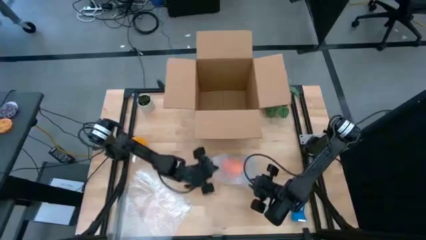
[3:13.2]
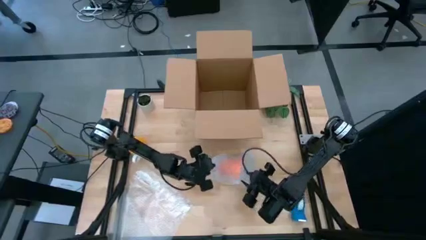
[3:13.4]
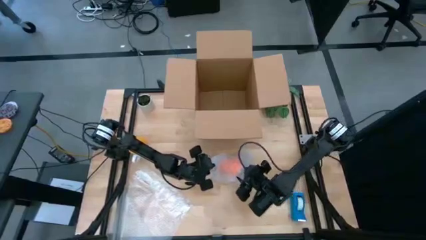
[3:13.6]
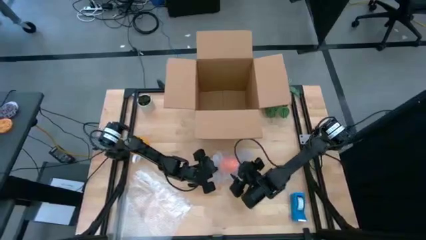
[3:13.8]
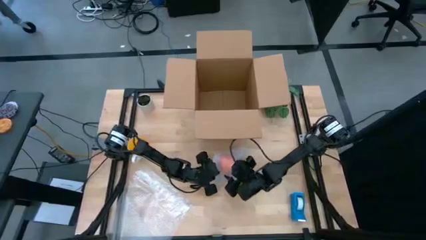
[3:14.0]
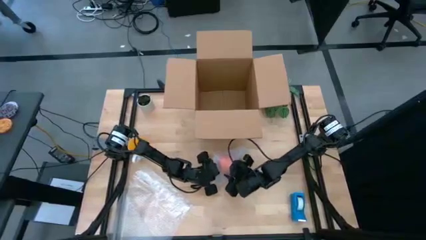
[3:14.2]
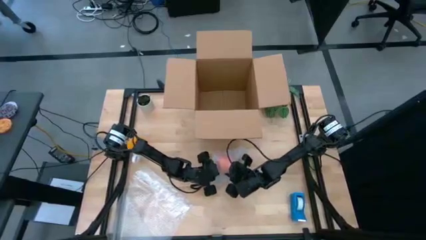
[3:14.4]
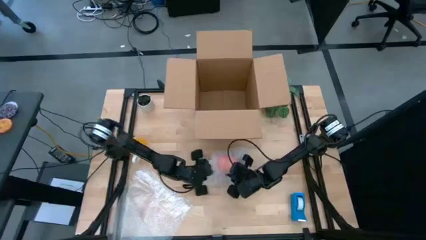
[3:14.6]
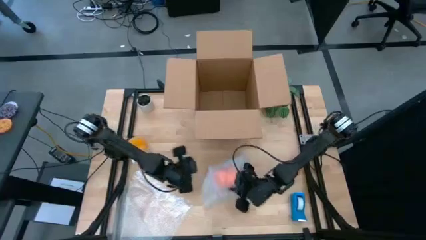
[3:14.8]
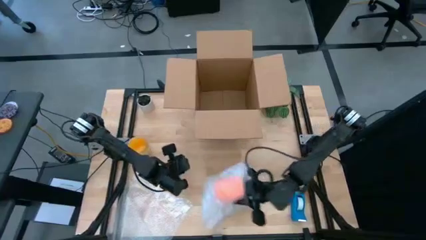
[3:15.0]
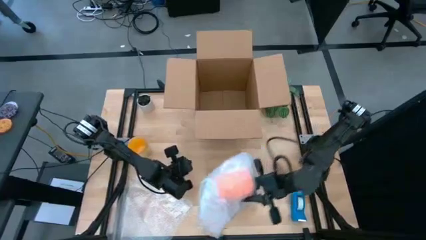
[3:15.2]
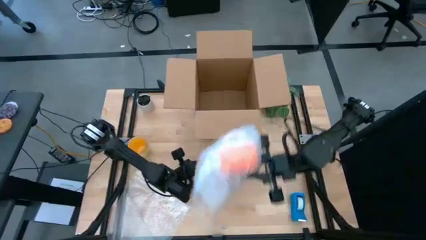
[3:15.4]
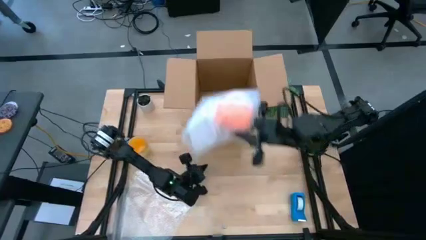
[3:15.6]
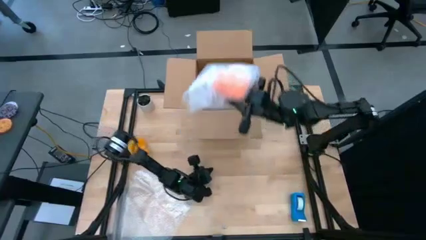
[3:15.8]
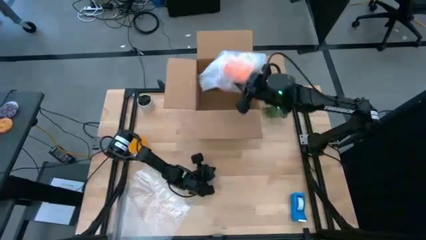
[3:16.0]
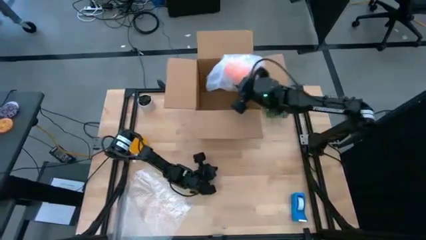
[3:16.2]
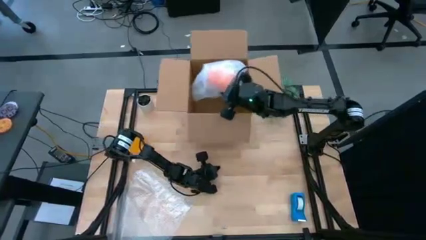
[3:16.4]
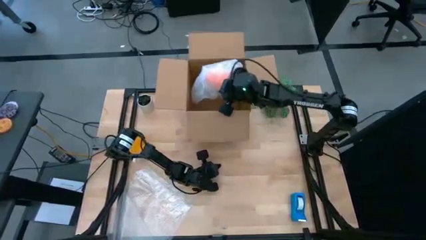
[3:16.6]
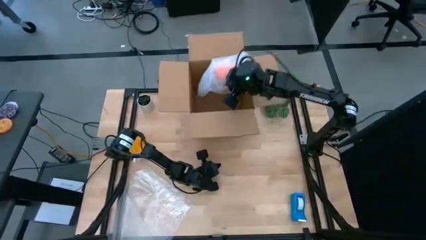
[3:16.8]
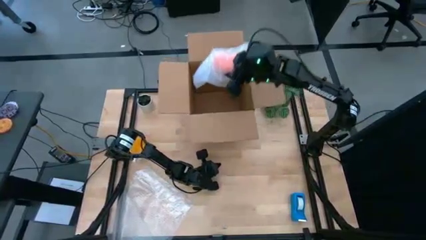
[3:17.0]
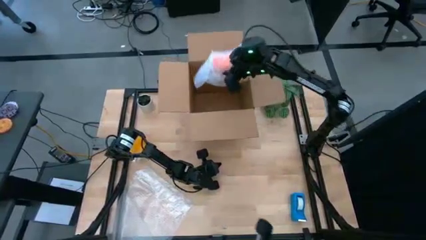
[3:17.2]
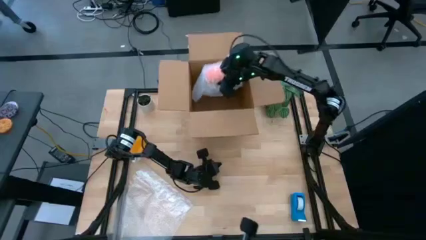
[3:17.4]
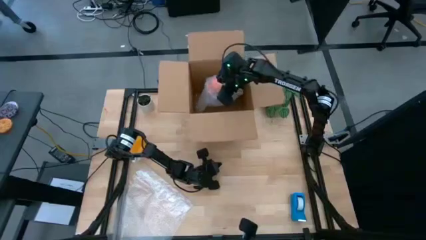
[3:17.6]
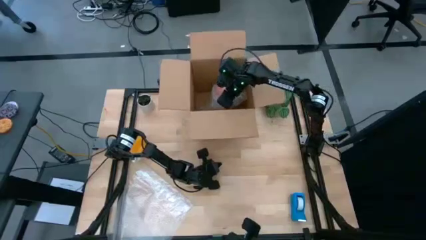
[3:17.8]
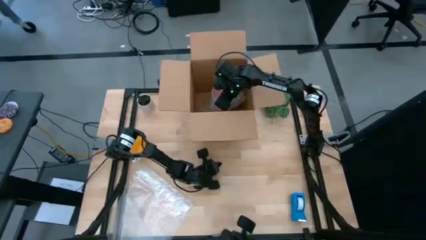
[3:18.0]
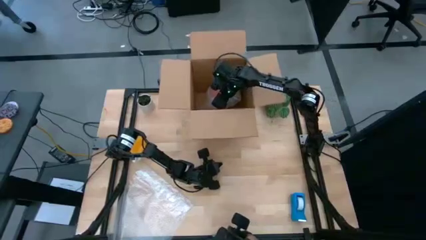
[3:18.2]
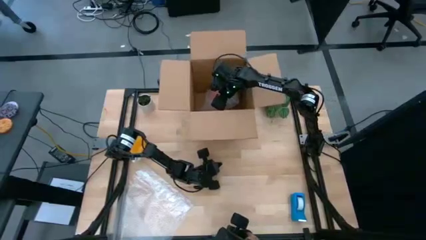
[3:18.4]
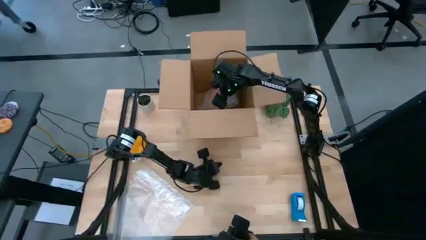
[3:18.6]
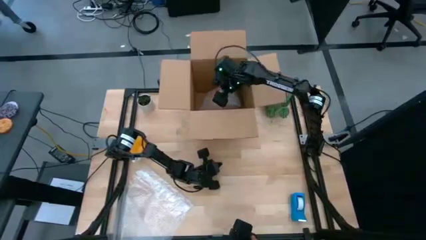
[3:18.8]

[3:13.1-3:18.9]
Task: wrap mug
Put the wrapped orange mug into the box

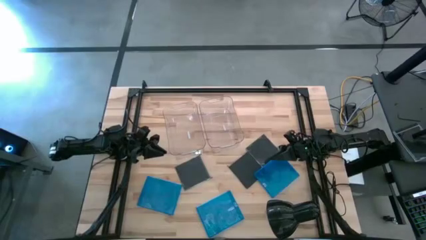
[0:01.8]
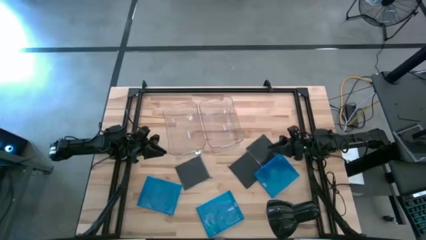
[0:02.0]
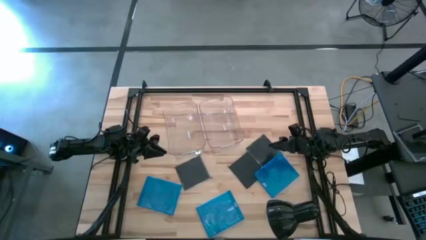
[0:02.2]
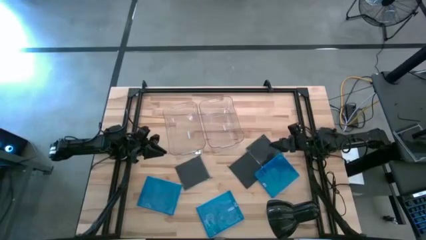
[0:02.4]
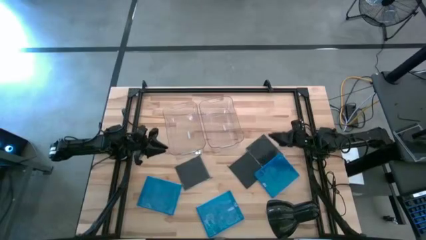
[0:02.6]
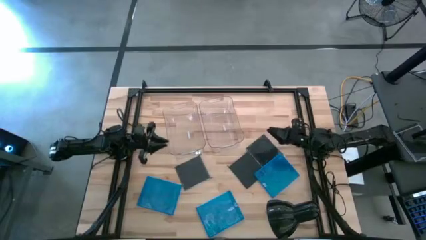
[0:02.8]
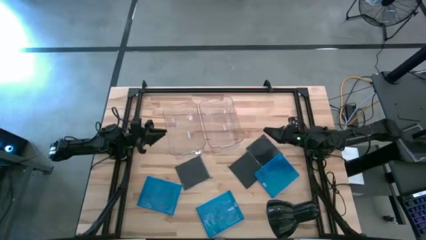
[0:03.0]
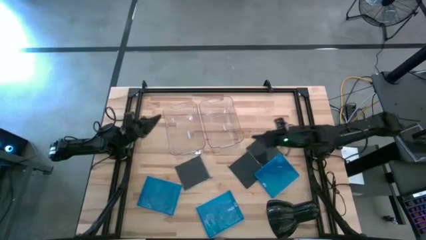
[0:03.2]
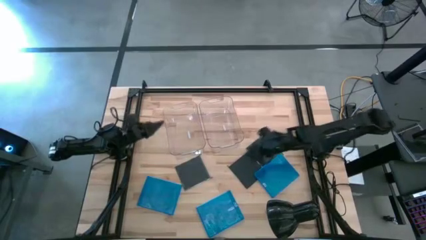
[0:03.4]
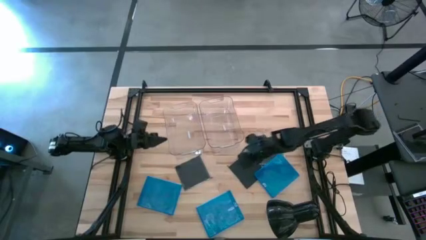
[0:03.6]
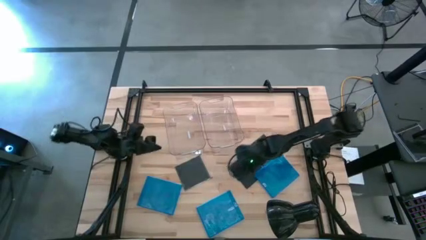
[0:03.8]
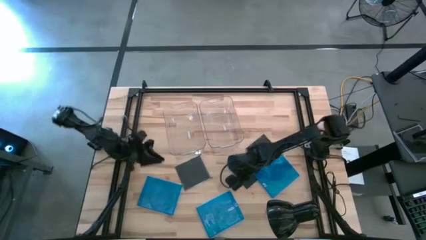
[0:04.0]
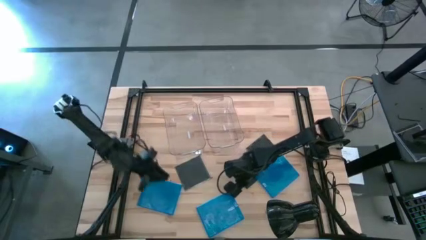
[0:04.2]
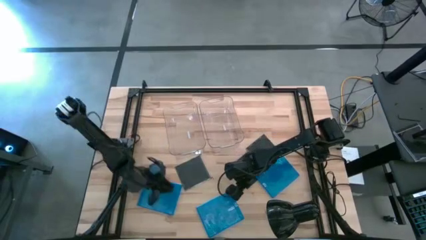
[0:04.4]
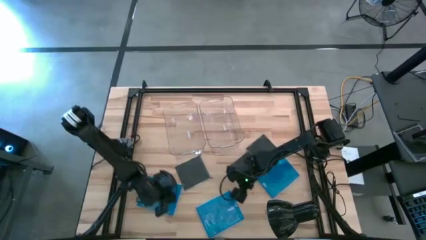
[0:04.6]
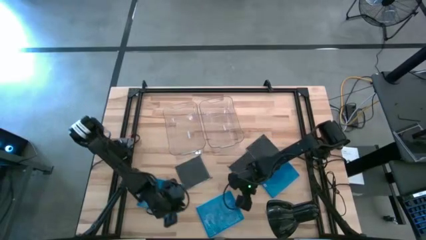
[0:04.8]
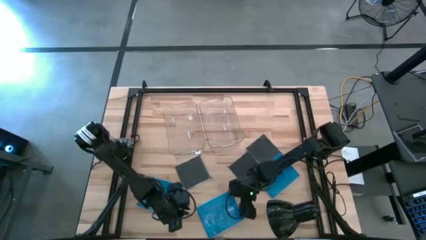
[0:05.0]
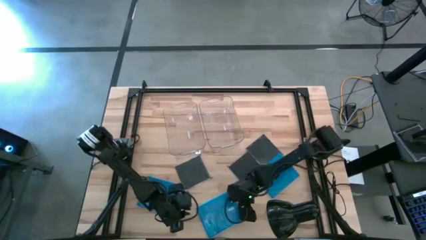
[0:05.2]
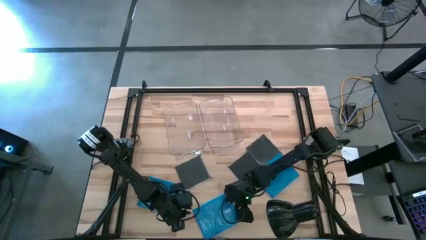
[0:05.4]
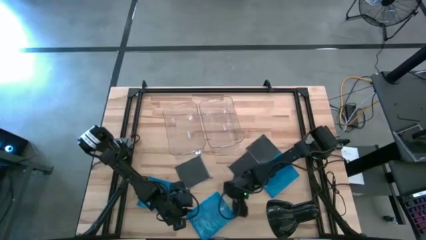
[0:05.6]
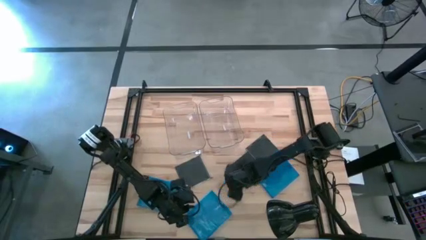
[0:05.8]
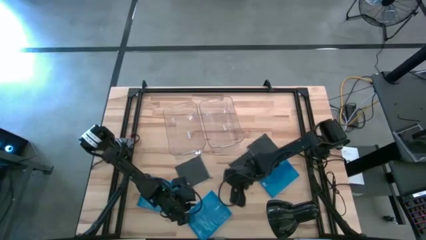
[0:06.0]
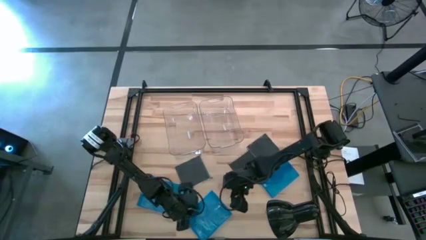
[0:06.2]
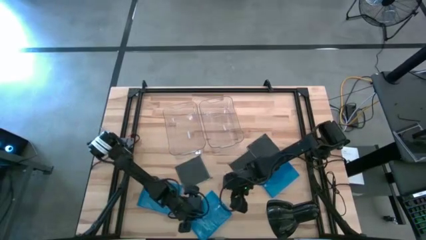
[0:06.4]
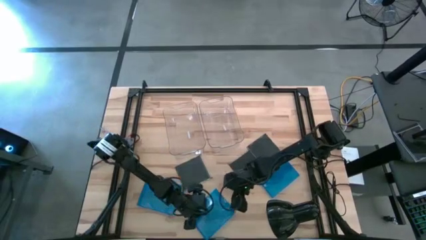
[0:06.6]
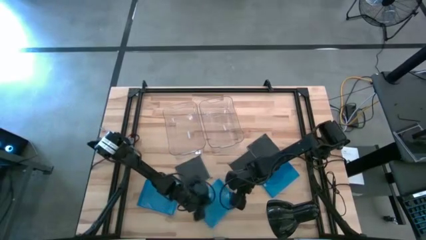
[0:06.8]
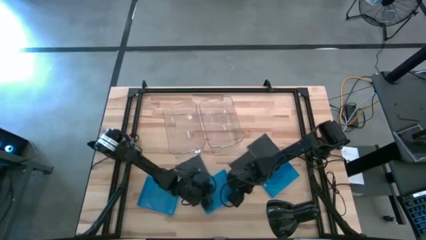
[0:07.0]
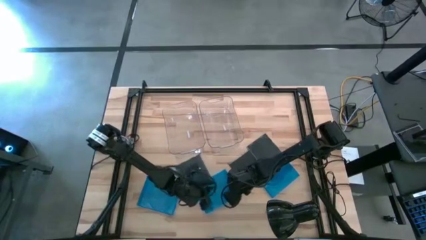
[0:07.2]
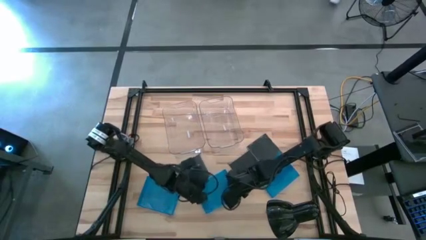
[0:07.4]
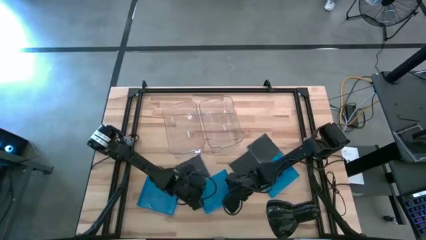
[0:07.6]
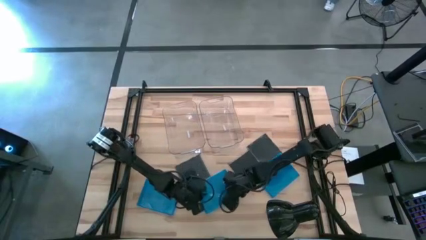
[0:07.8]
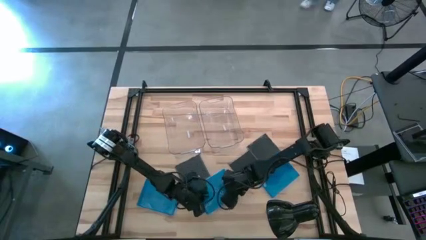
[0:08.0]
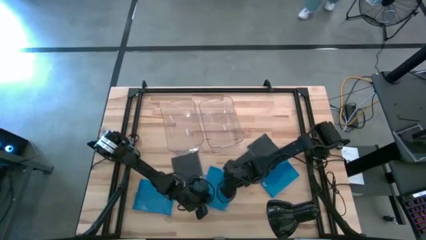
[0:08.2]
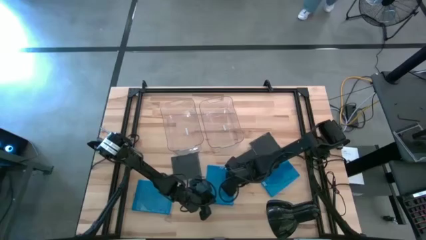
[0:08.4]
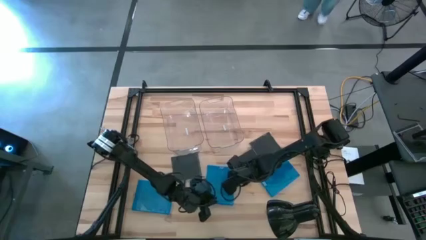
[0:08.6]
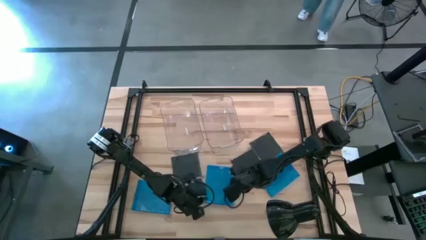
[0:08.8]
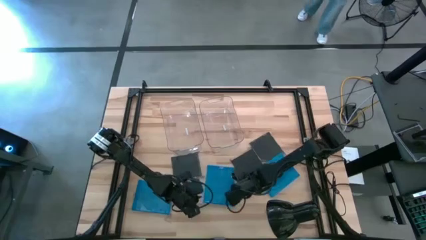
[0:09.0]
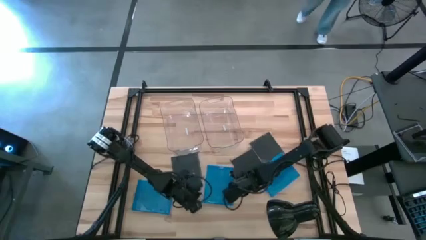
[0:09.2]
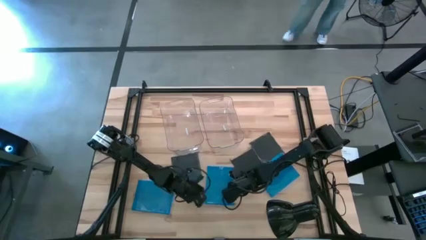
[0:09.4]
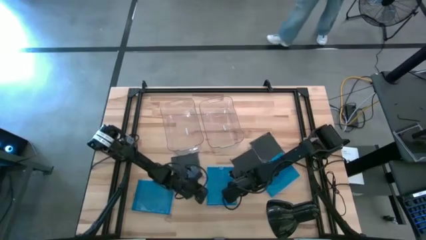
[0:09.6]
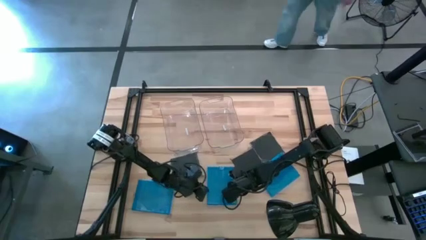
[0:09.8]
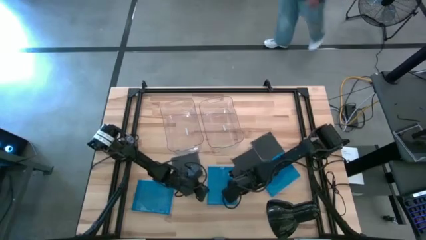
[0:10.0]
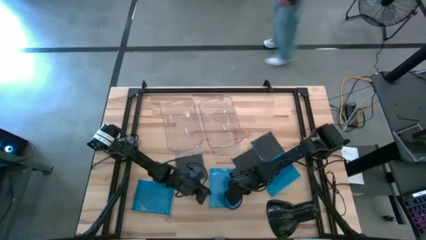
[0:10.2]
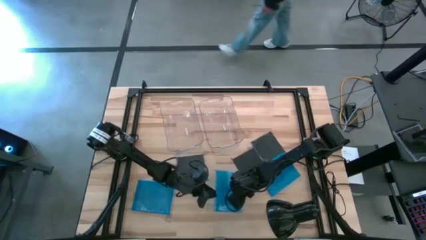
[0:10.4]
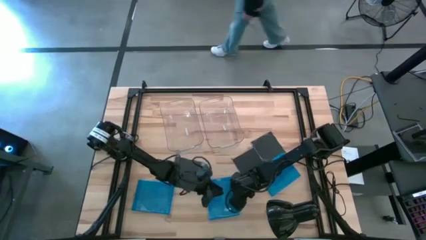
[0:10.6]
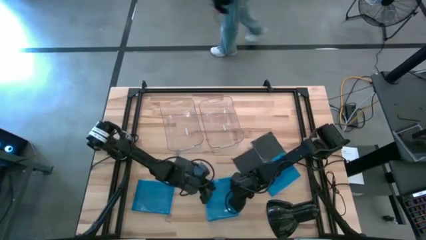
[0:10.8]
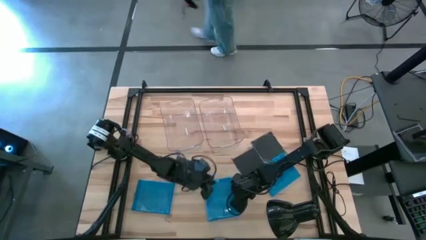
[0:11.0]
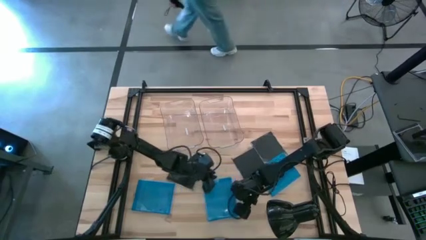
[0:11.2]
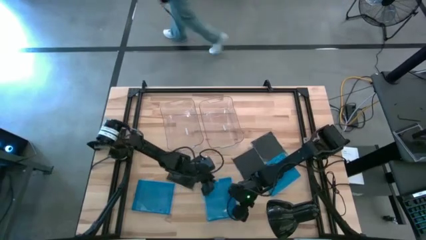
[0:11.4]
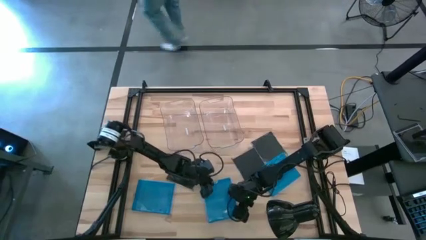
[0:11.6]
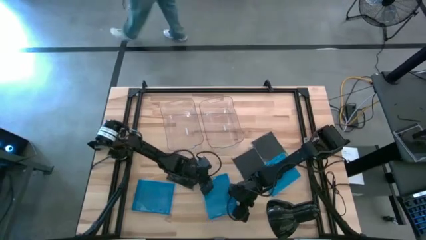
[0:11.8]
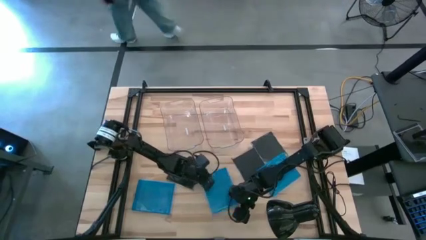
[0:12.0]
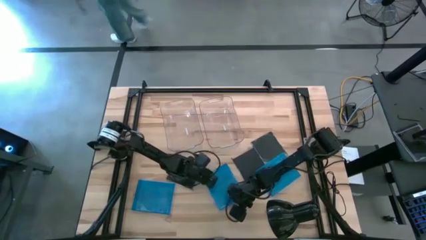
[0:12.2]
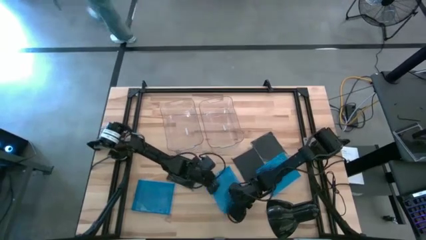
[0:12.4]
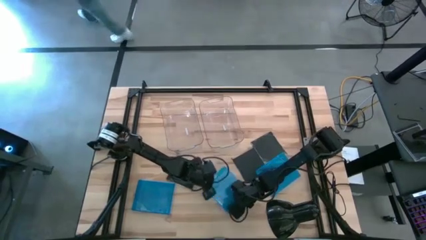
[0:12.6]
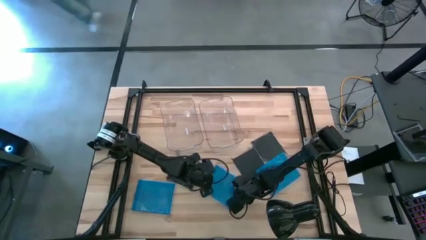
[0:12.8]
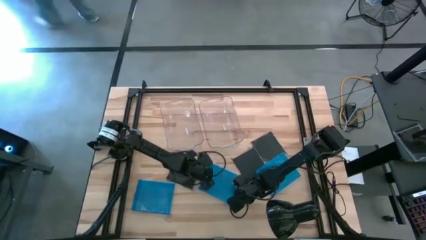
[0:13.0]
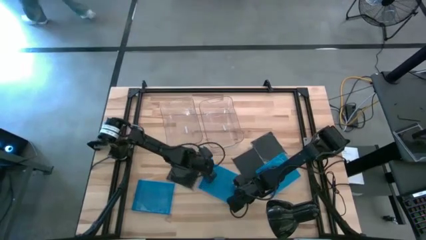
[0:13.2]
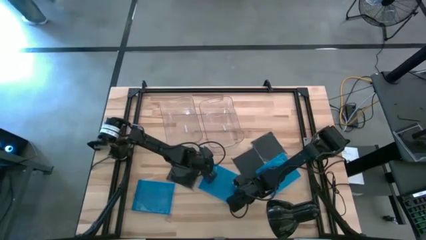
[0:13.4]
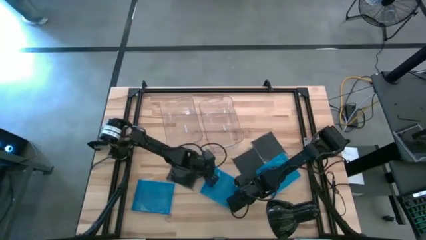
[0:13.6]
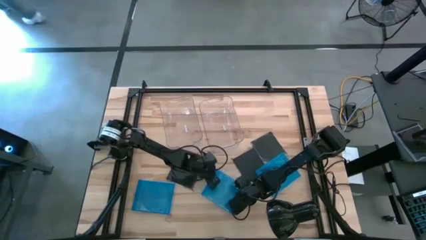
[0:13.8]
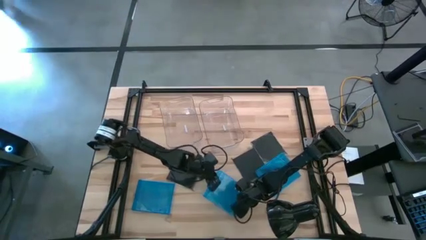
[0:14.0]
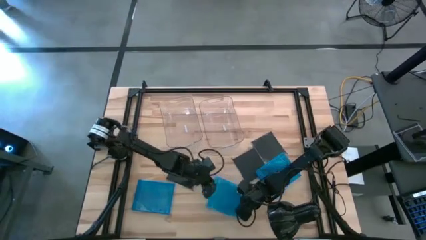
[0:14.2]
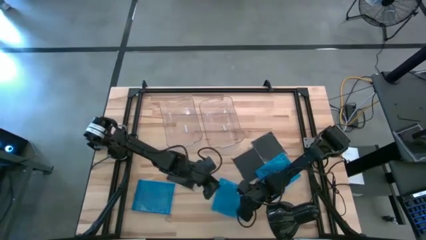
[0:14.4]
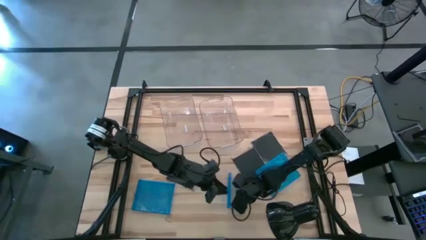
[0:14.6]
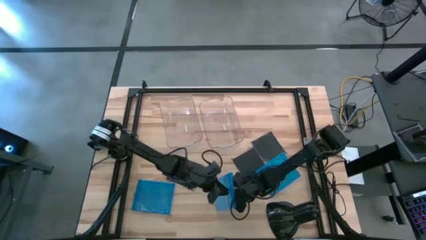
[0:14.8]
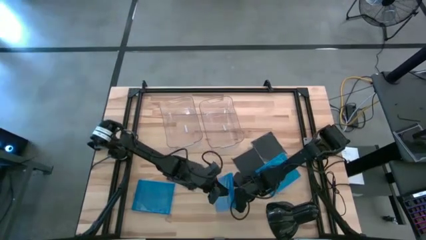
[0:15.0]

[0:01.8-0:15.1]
Task: Pick & place jewel cases by type
Put the middle blue CD case into the right transparent bin
